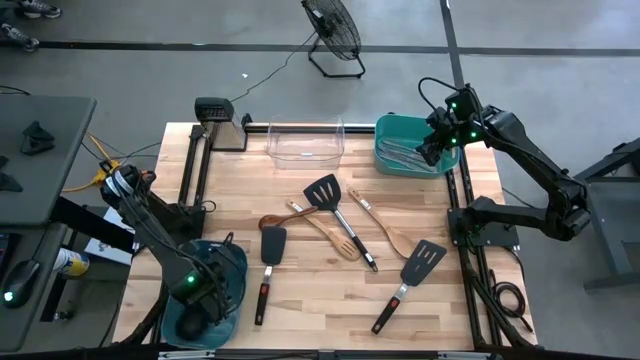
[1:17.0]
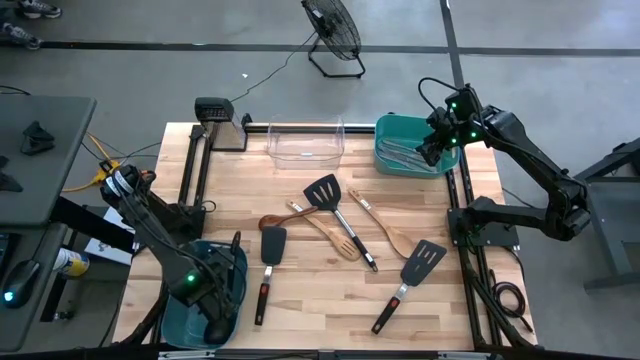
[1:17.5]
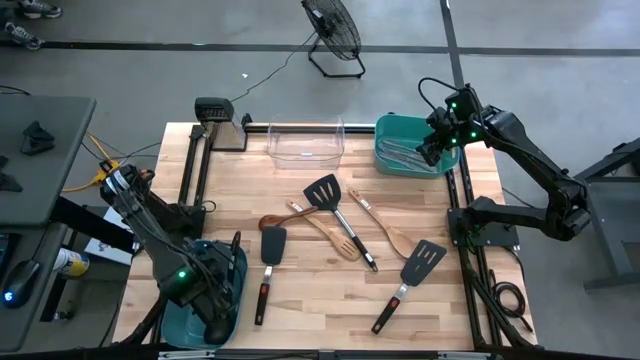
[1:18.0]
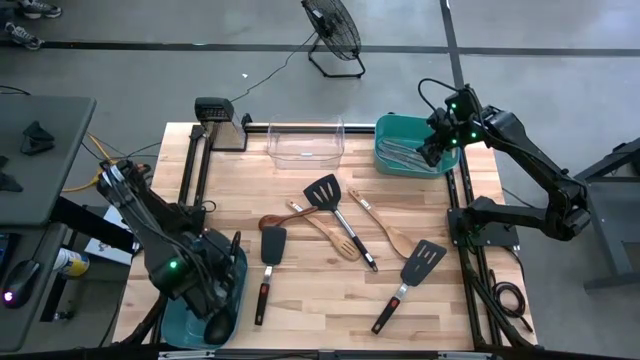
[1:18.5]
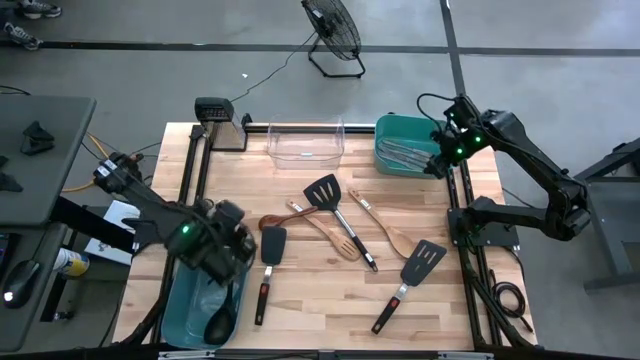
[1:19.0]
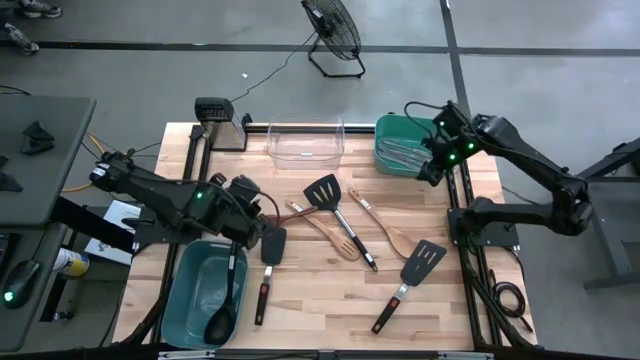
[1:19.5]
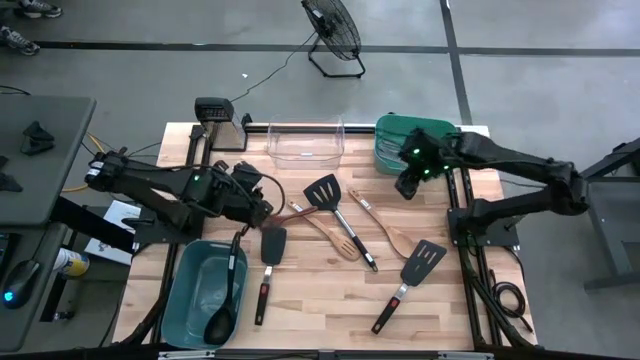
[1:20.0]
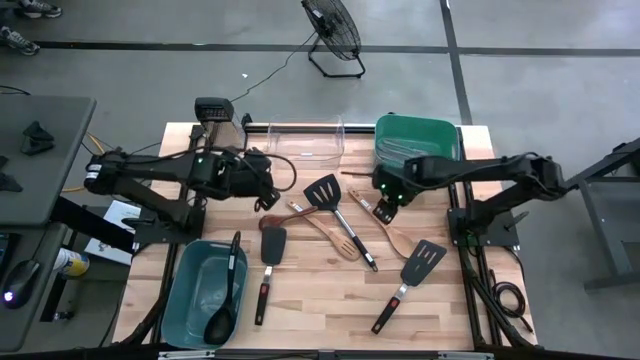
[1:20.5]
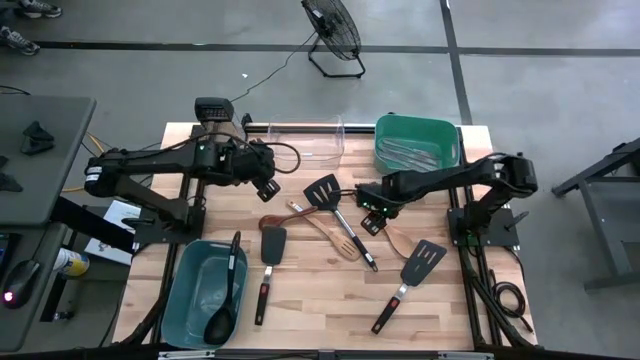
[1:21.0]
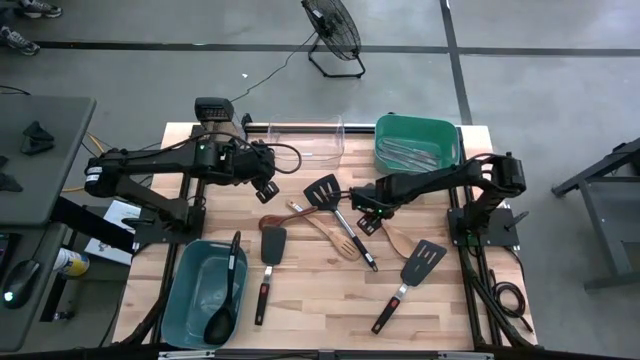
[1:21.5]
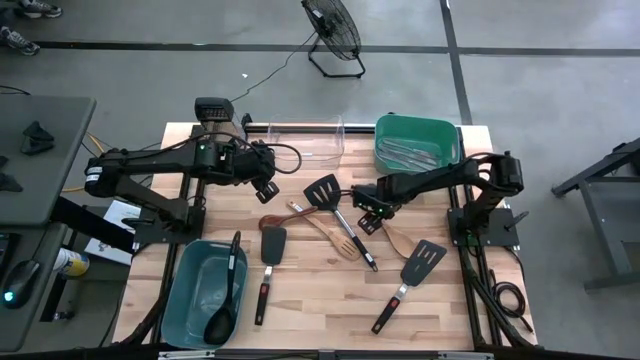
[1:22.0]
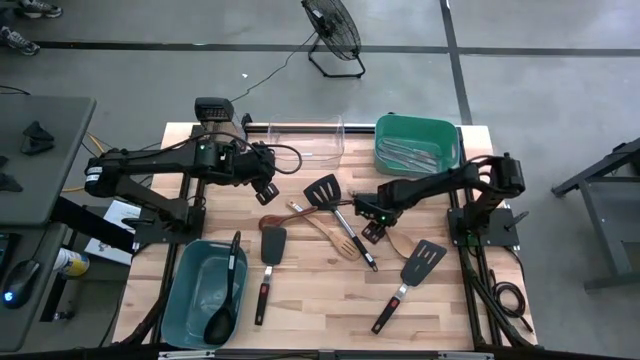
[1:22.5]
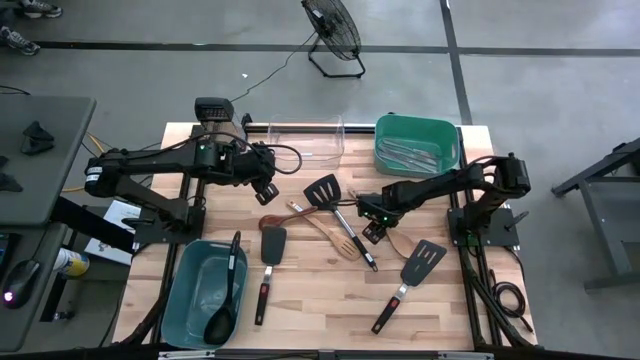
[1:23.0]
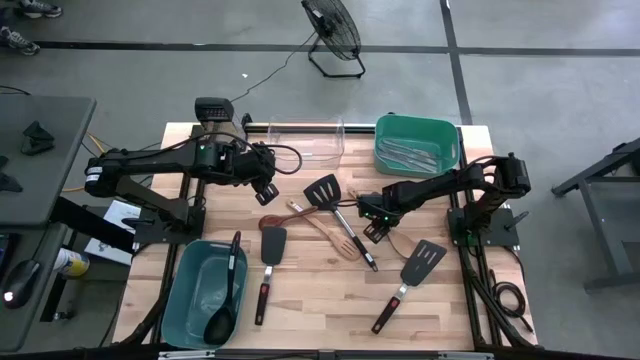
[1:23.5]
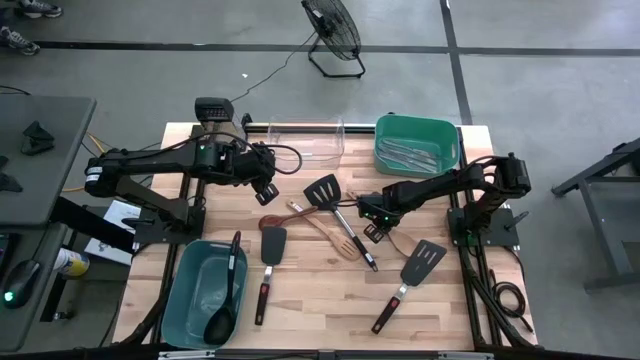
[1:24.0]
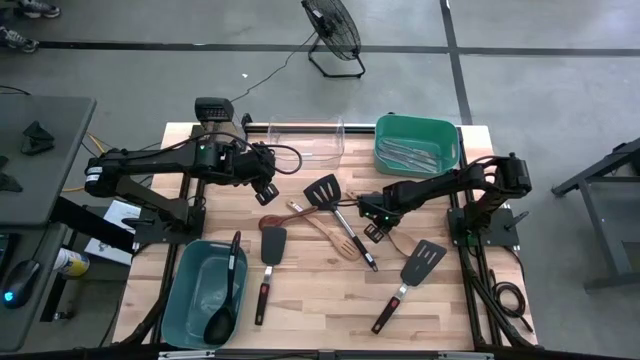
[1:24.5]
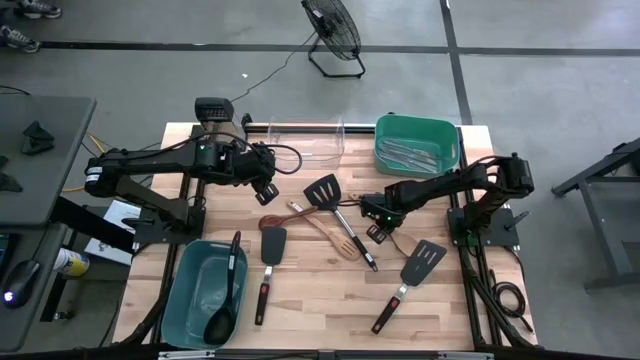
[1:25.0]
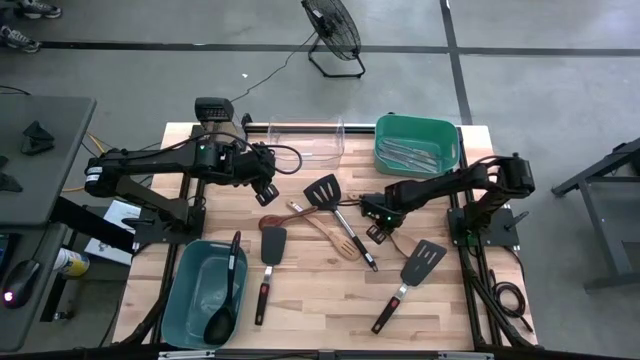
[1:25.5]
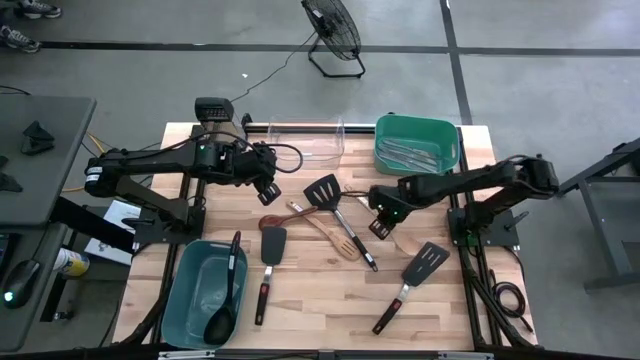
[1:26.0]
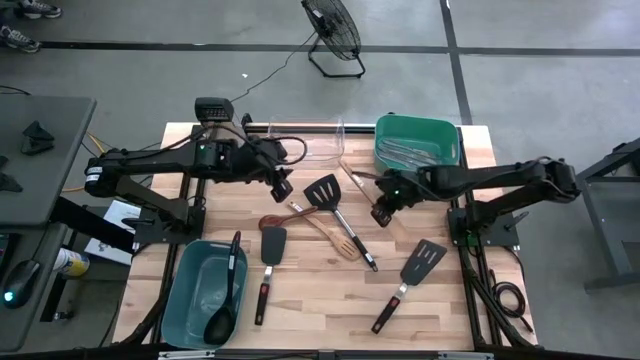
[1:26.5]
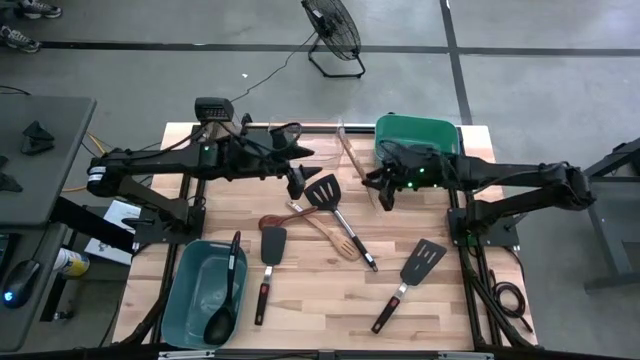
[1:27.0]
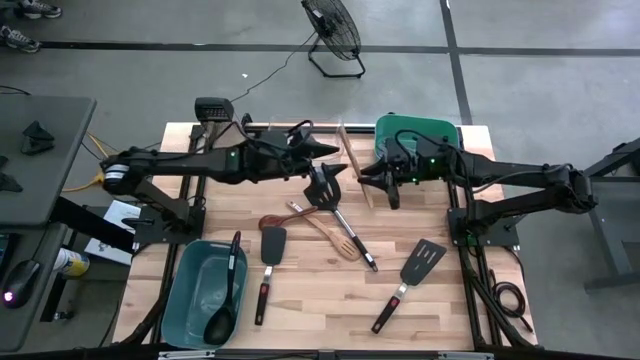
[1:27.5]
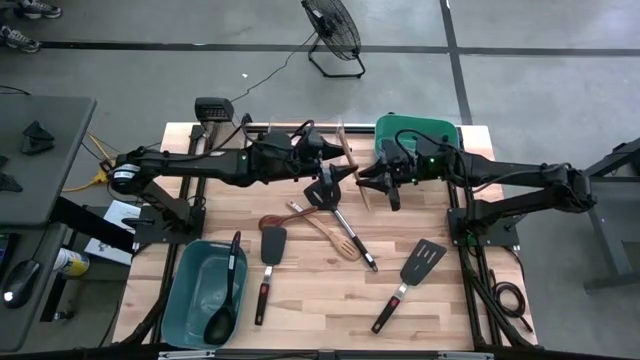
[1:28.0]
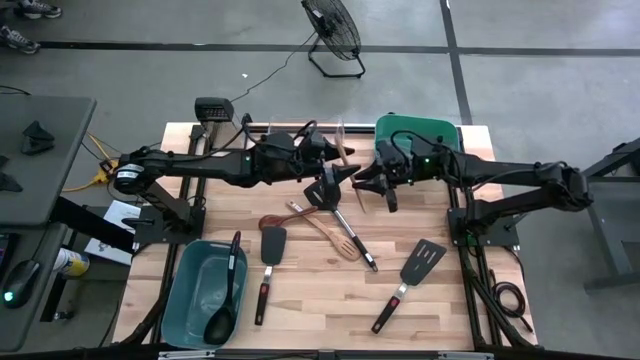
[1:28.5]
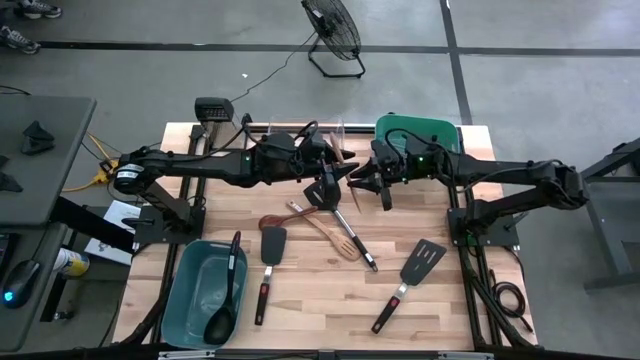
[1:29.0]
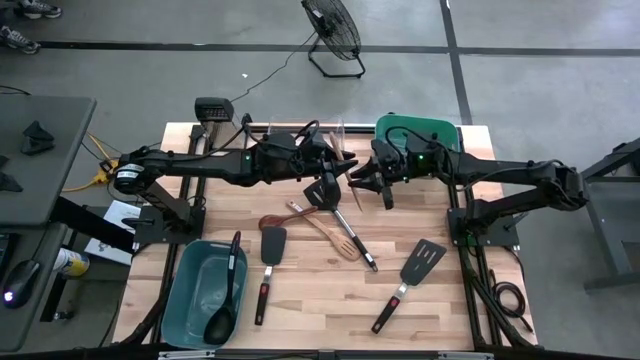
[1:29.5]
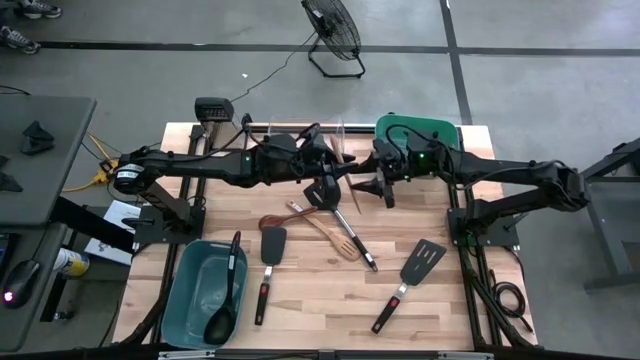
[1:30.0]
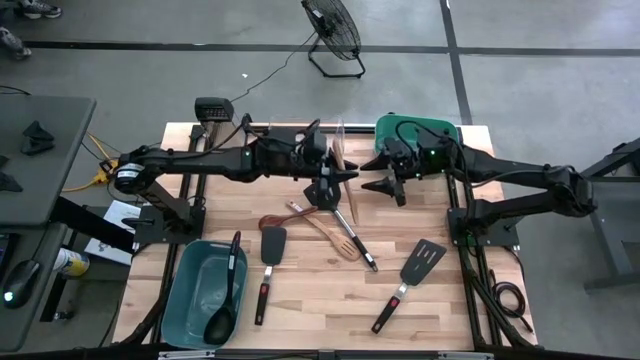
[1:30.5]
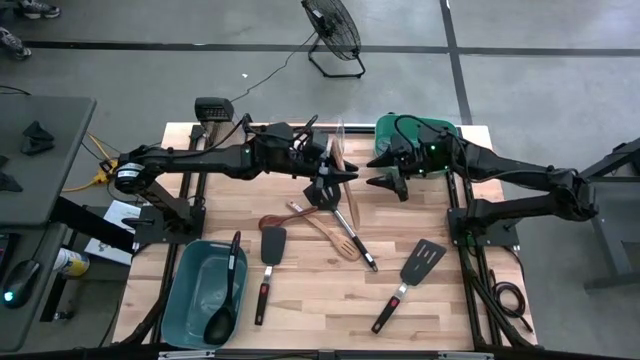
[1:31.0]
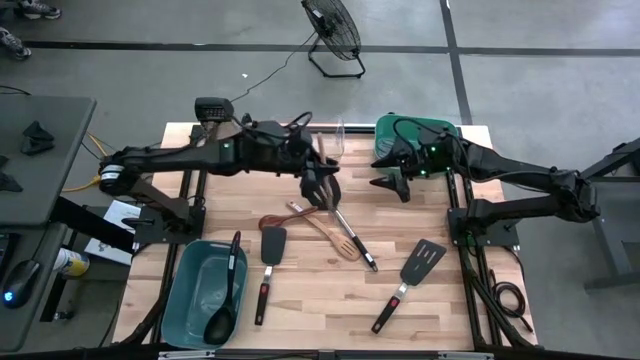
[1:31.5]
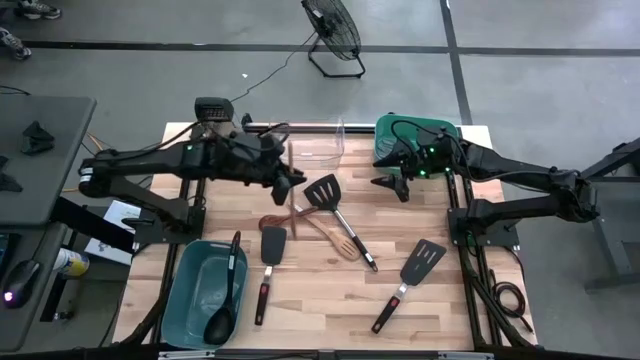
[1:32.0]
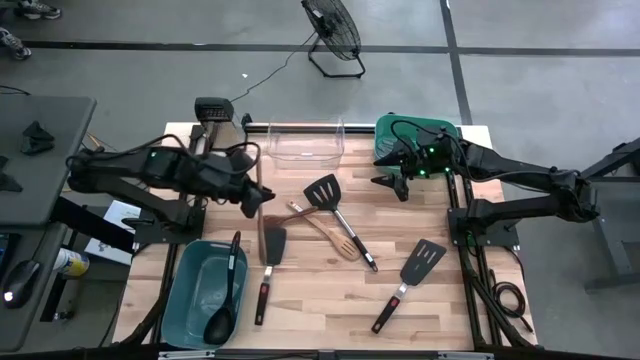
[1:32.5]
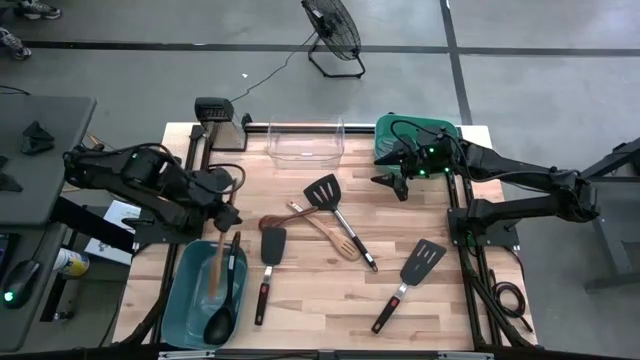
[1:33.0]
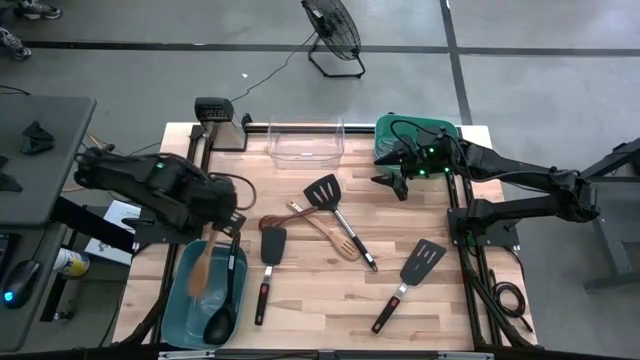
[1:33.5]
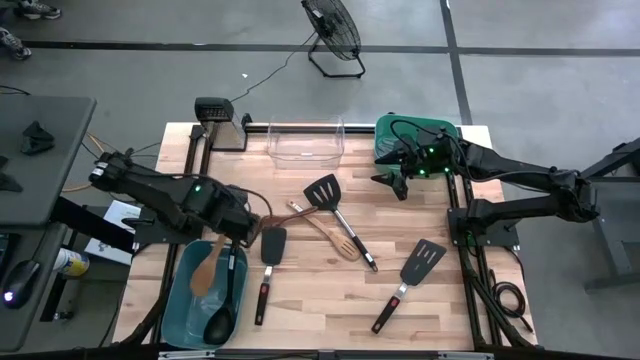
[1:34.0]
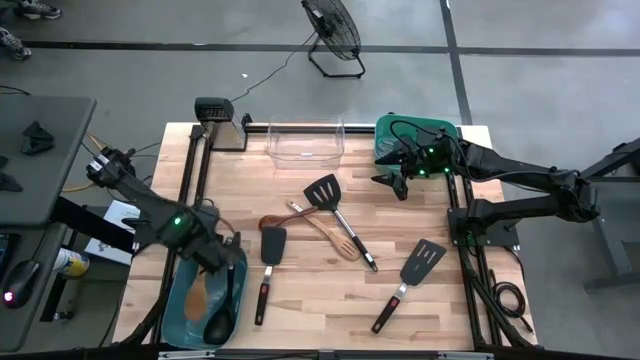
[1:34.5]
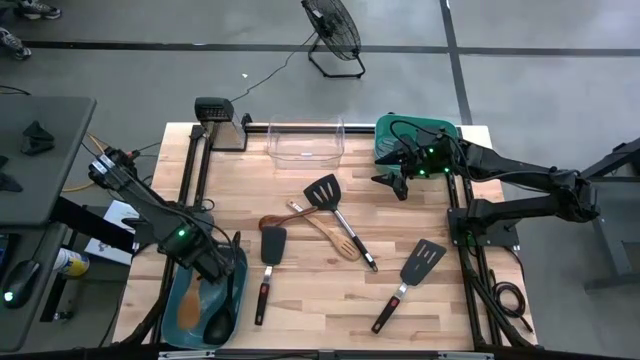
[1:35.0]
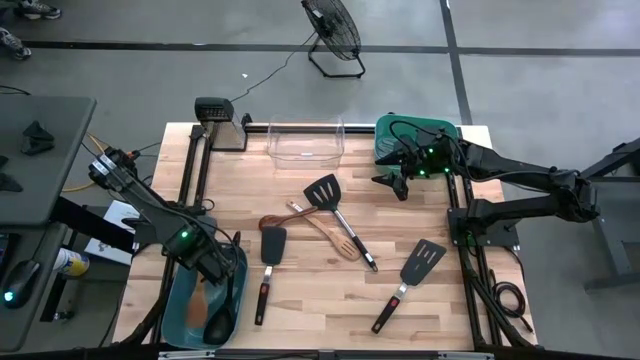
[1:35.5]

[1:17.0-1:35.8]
Task: Pick & Place Kitchen Items
Put the wooden spoon into the blue bin

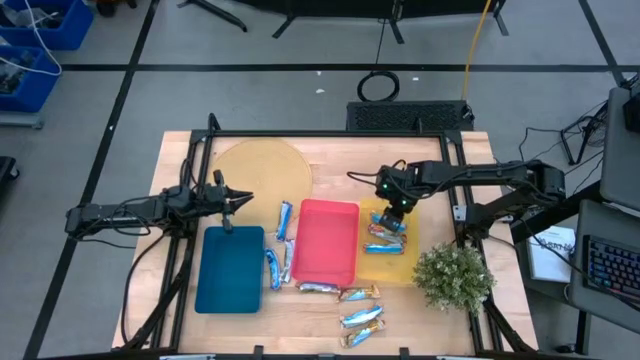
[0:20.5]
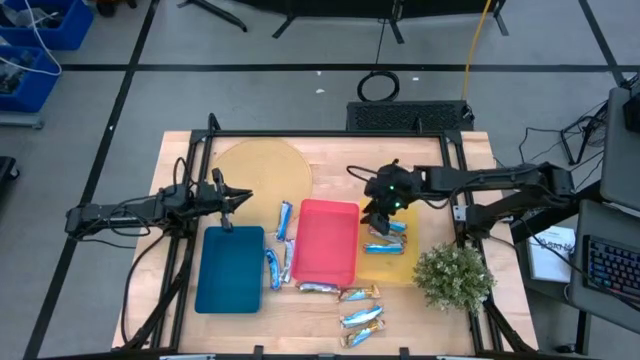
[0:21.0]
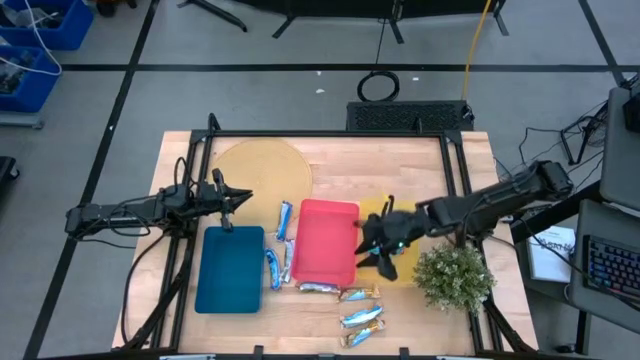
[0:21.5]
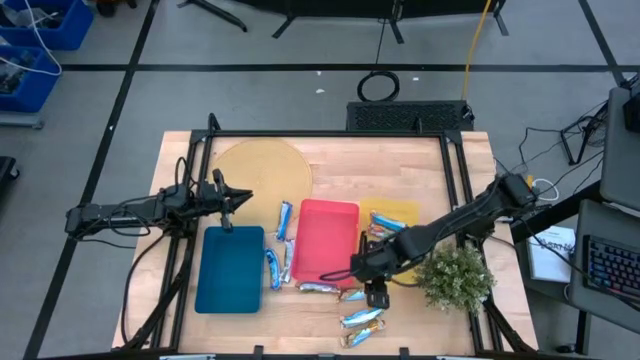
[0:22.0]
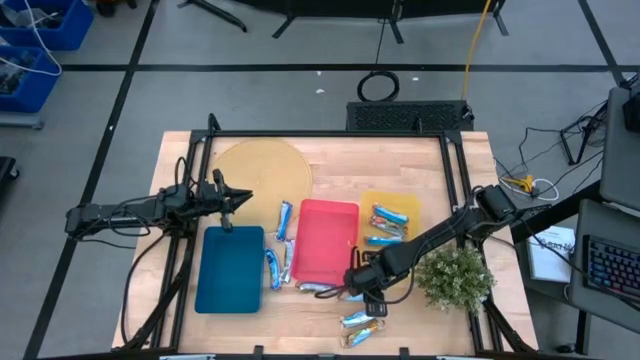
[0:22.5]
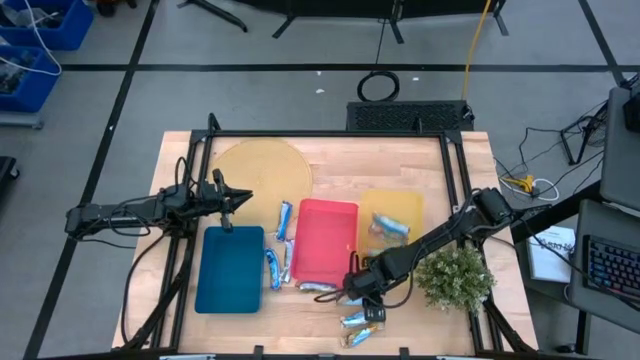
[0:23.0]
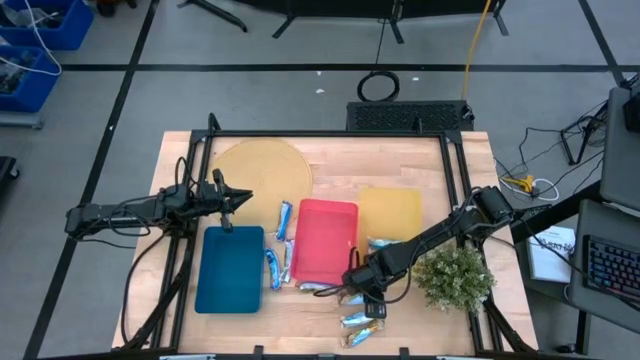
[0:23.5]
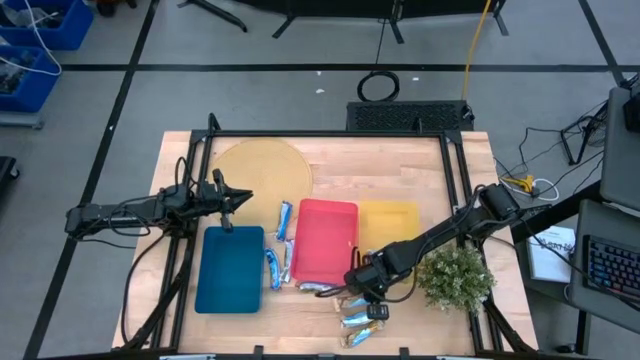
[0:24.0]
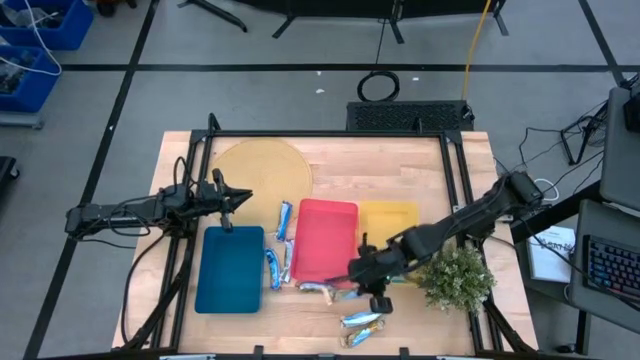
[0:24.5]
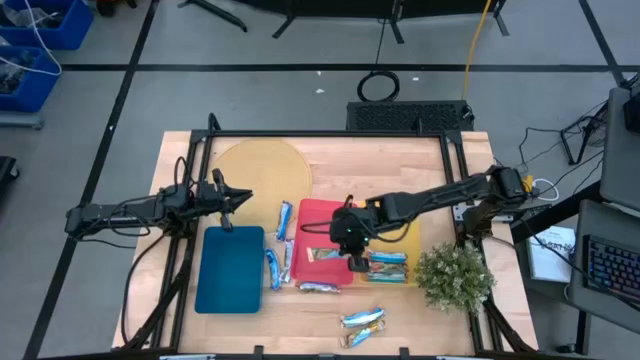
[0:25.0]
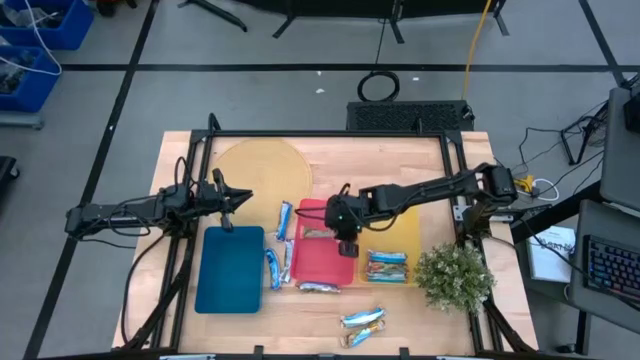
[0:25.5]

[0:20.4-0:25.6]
Task: Pick and place Granola Bars by type
Put the yellow granola bar into the red bin
